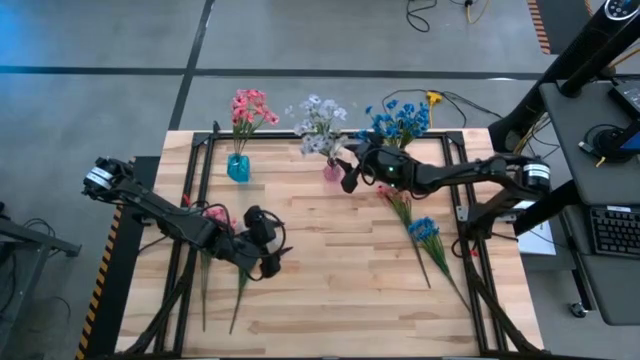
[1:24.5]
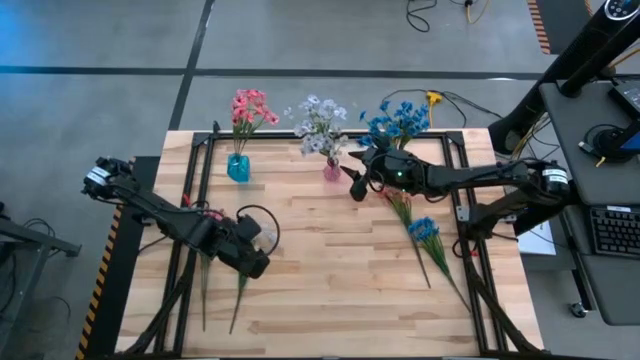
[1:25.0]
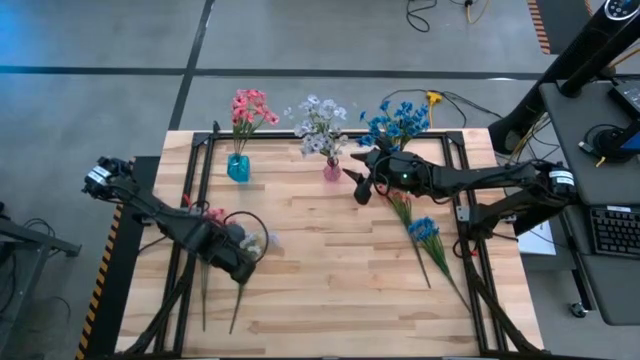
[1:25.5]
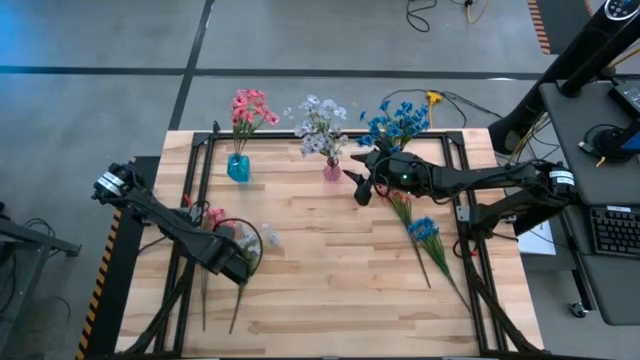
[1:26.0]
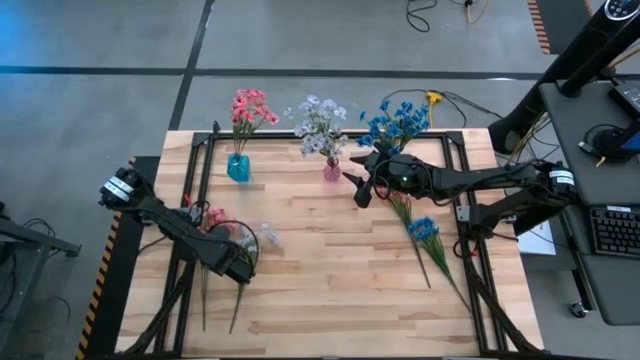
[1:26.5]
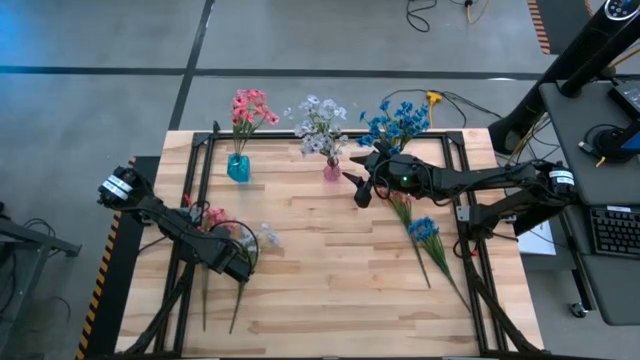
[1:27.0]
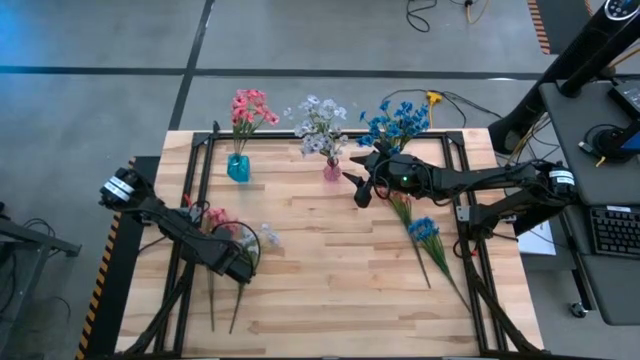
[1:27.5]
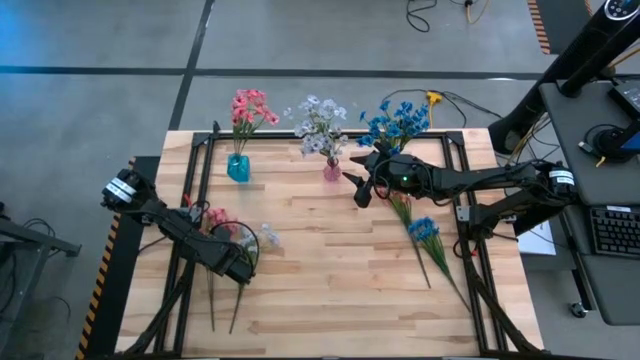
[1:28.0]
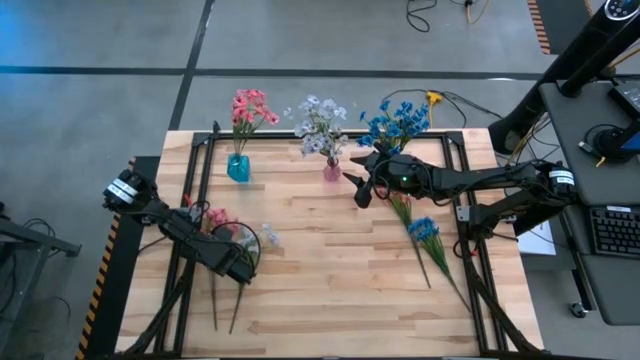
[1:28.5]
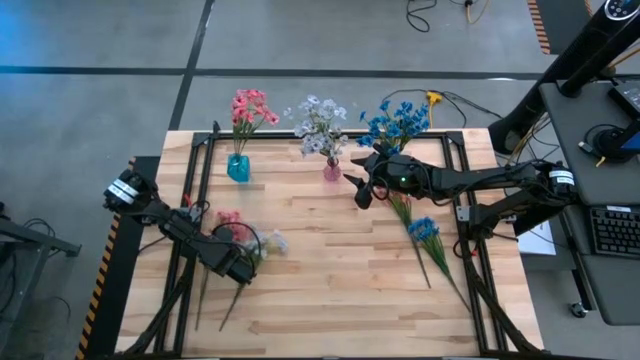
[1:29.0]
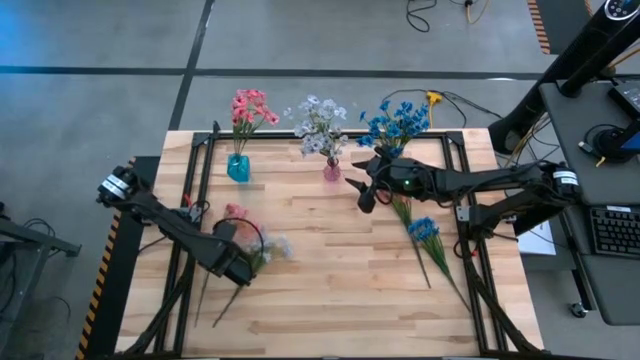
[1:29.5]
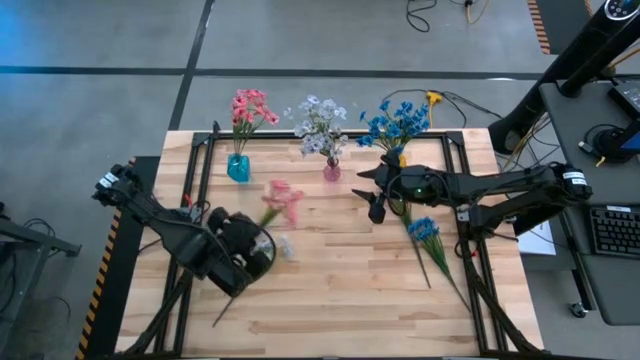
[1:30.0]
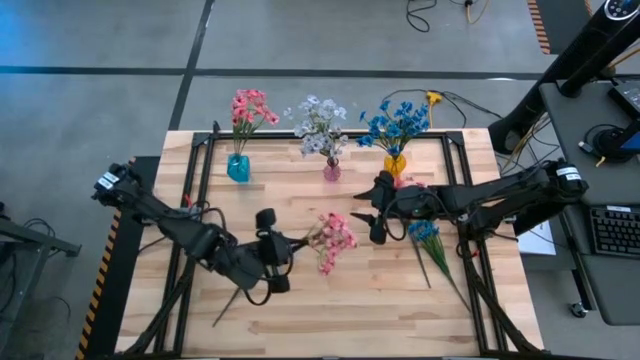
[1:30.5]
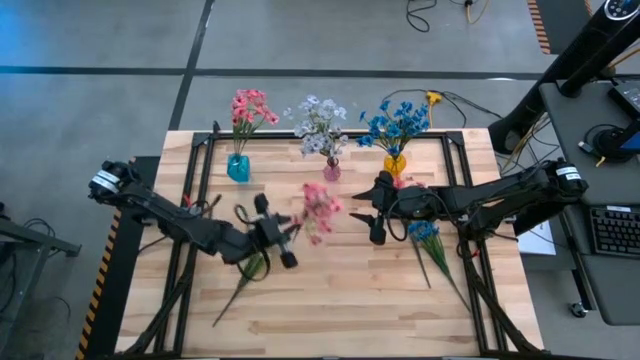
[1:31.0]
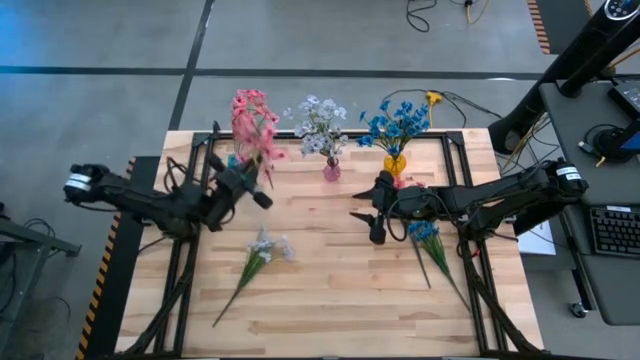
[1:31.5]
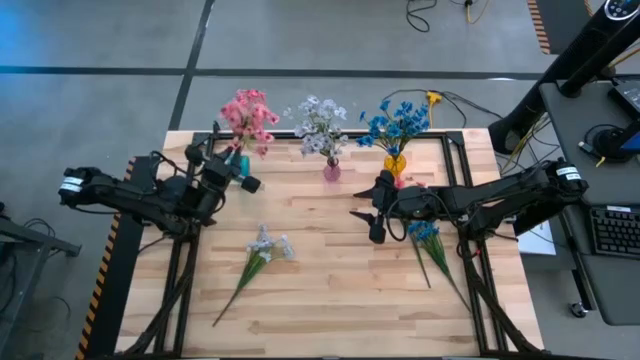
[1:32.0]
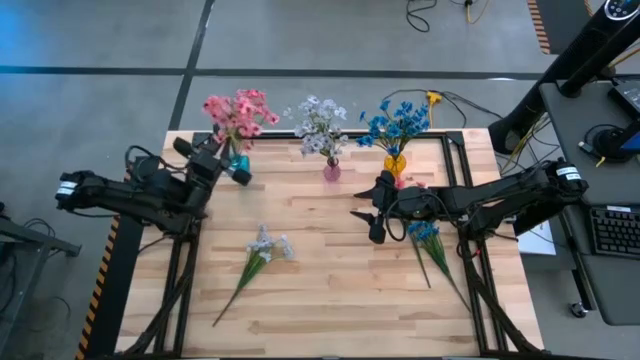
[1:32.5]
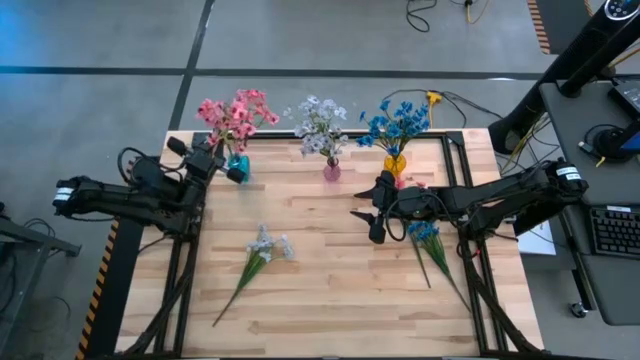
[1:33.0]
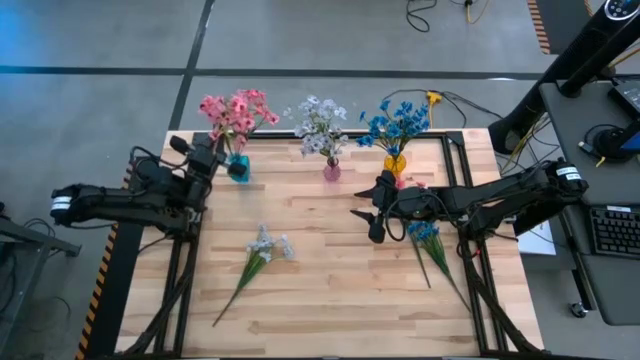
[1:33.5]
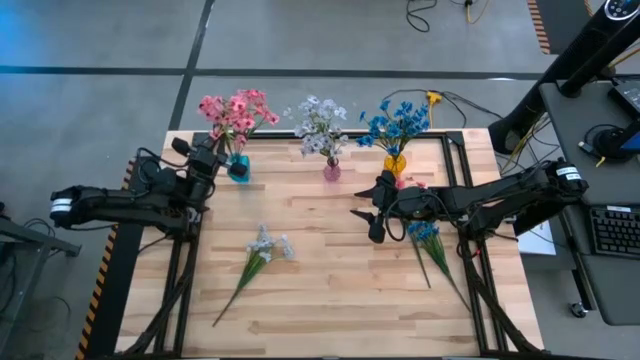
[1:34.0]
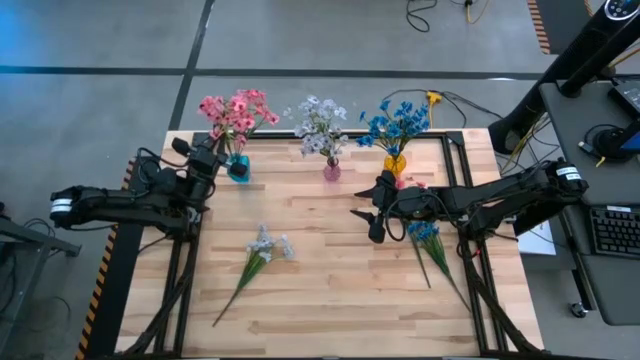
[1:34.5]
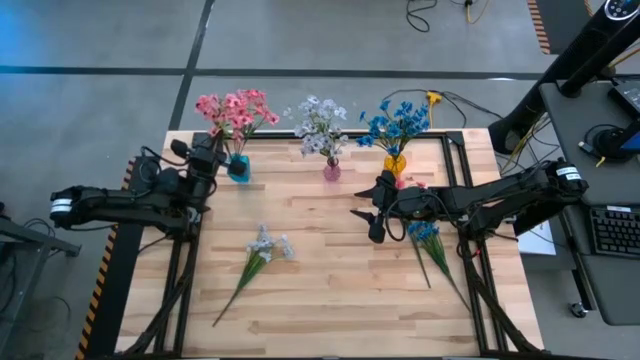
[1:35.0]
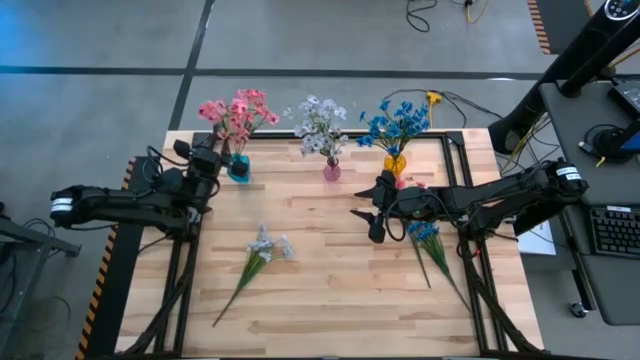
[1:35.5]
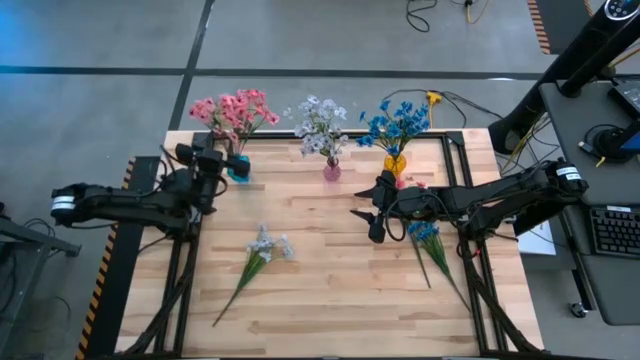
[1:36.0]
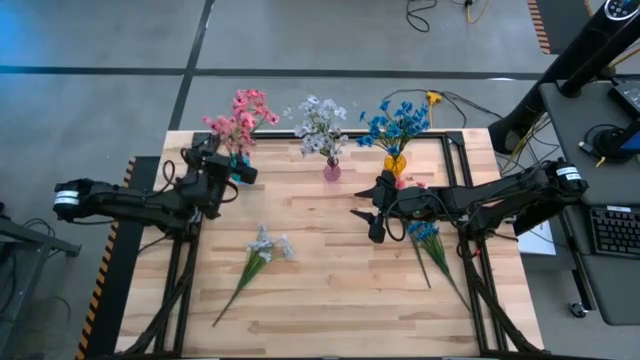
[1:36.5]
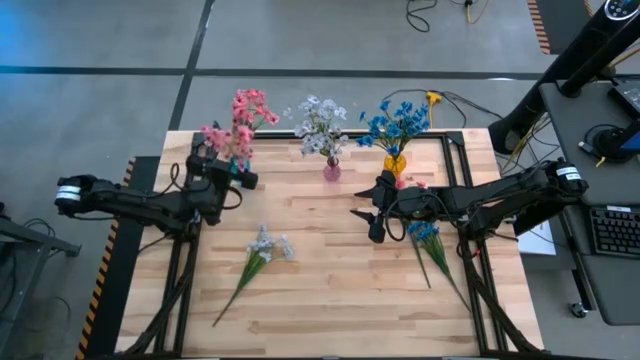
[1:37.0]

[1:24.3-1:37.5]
Task: Sort flowers into vase by color
Put the left pink flowers into the blue vase

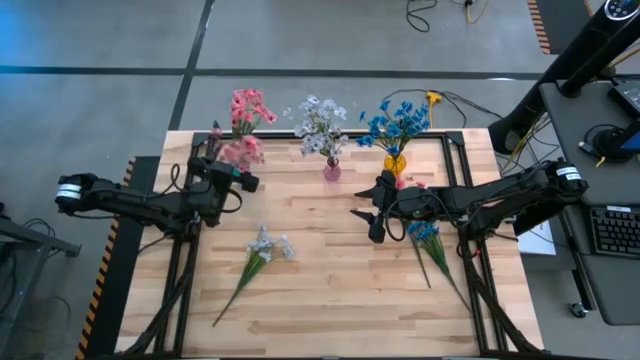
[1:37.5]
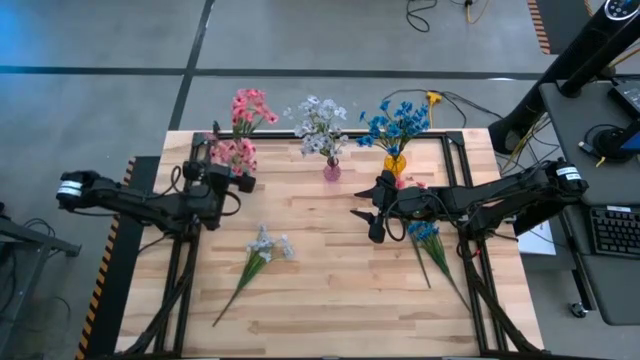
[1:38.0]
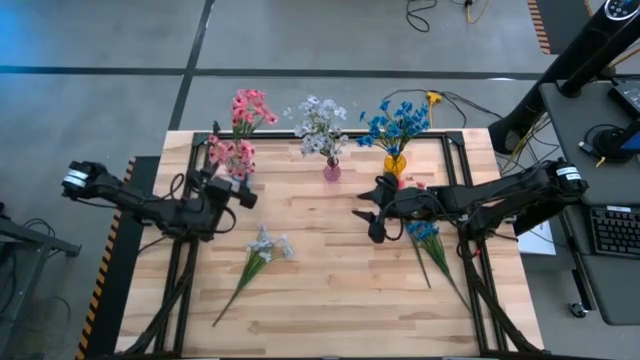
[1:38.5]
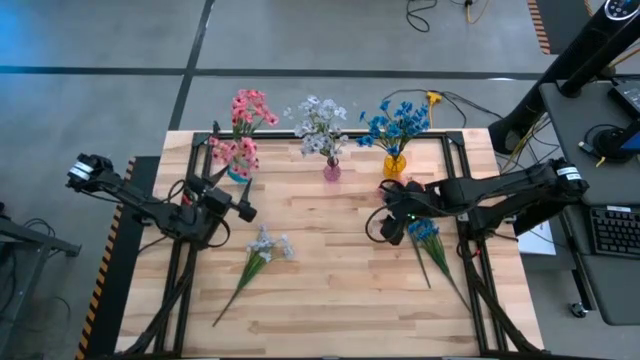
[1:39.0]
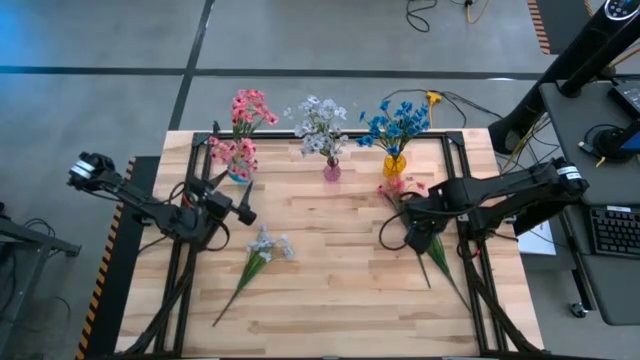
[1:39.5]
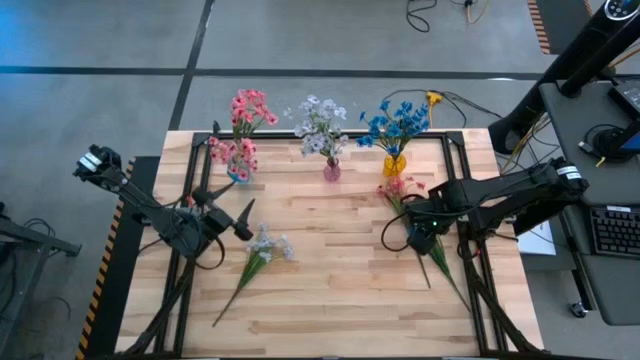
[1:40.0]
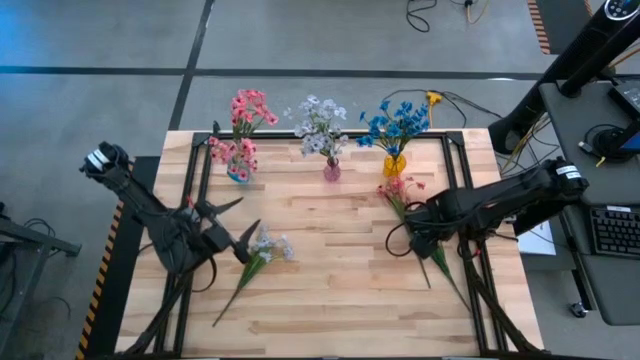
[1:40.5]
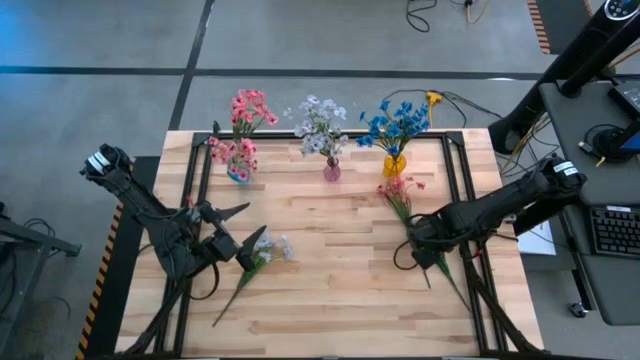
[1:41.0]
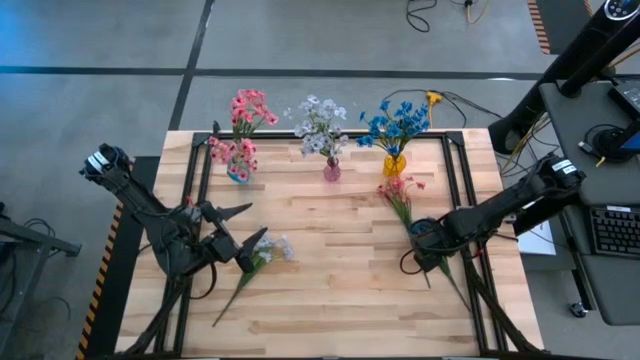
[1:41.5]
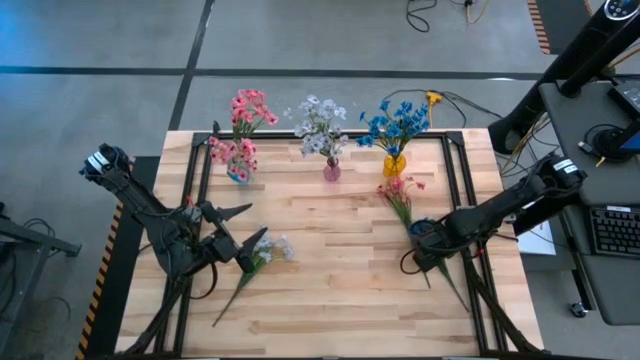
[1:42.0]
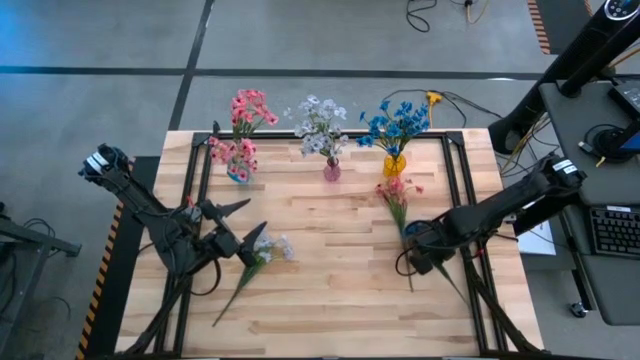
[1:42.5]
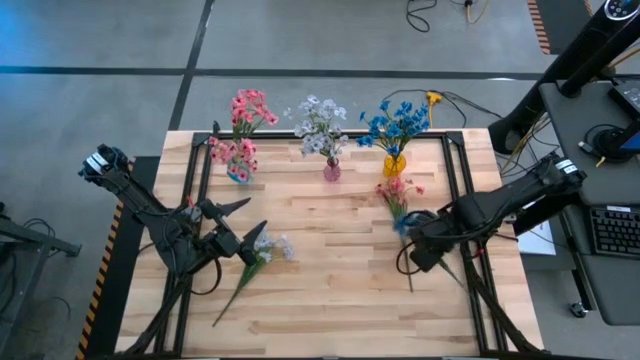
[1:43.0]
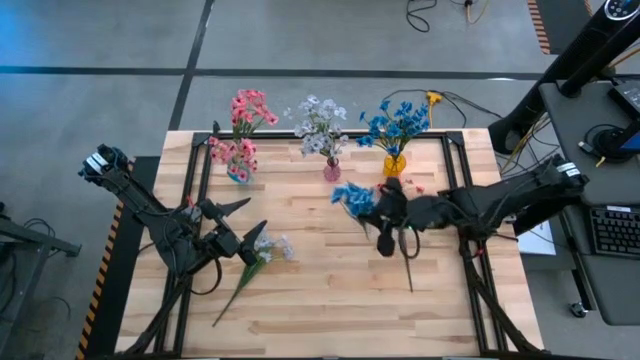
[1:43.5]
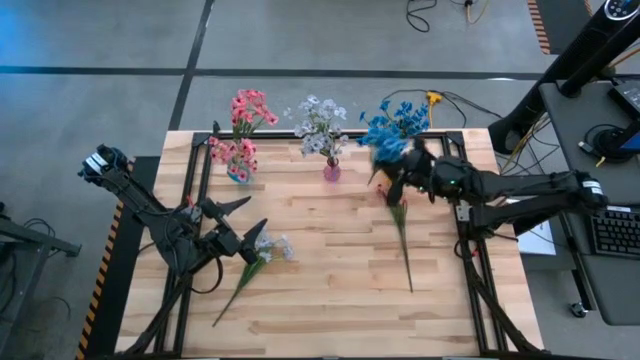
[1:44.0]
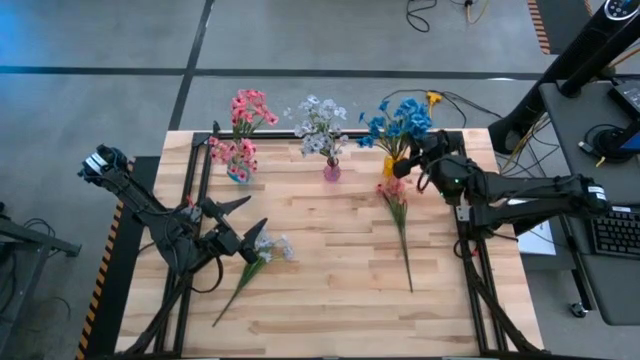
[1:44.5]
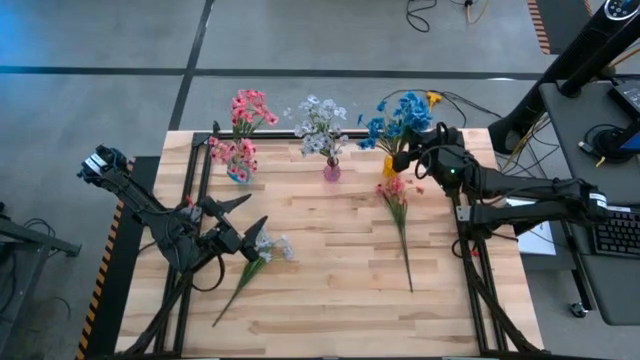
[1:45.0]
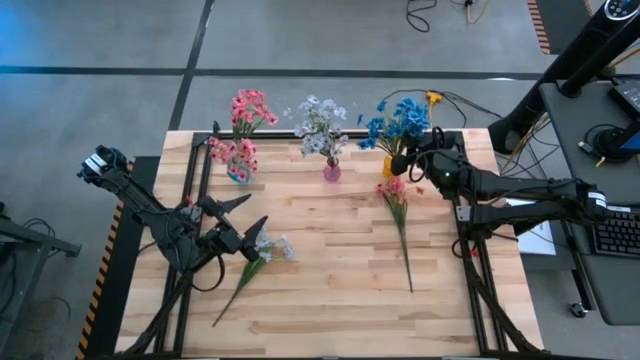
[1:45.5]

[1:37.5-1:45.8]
Put the blue flowers into the yellow vase
